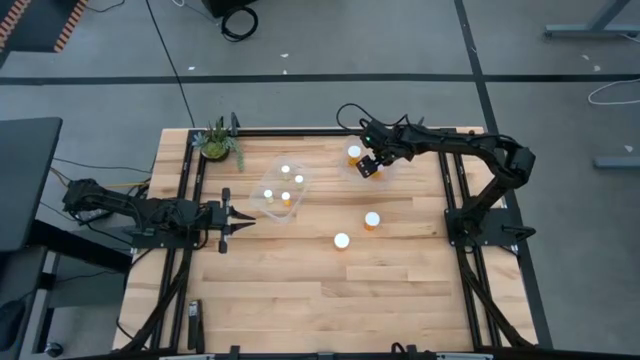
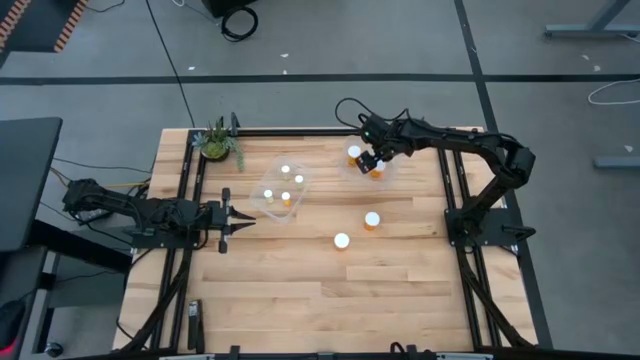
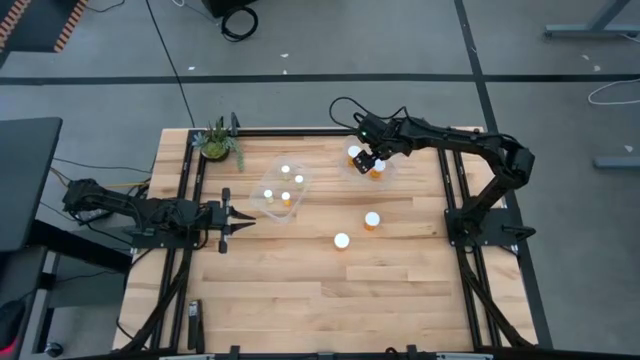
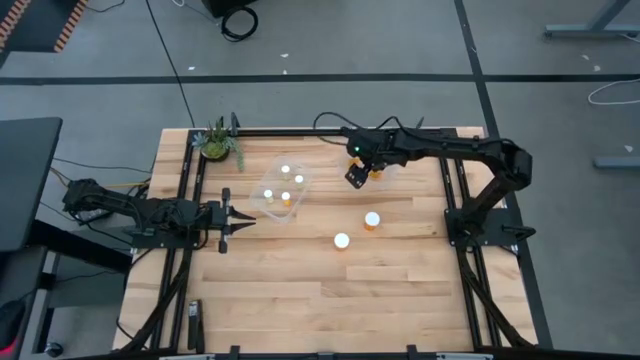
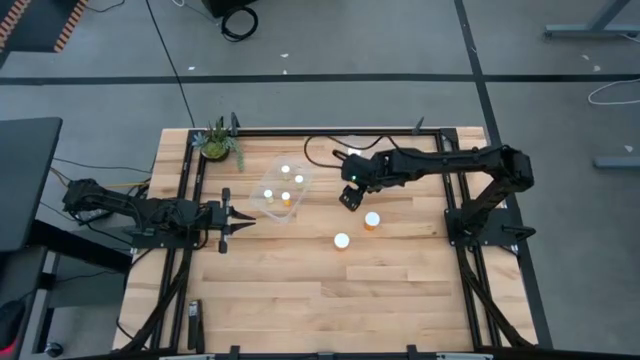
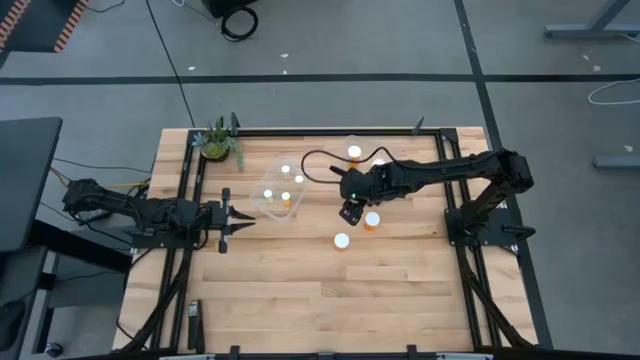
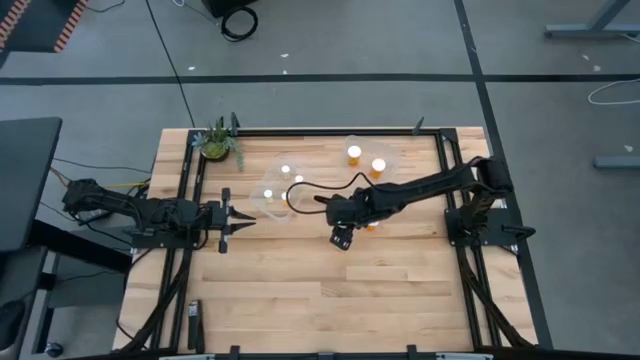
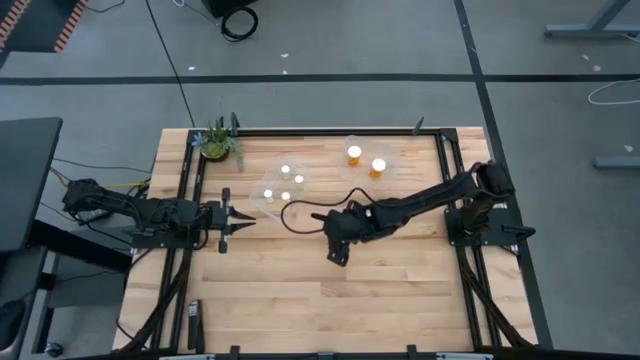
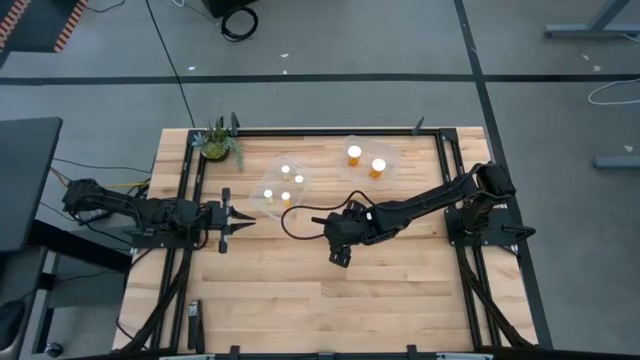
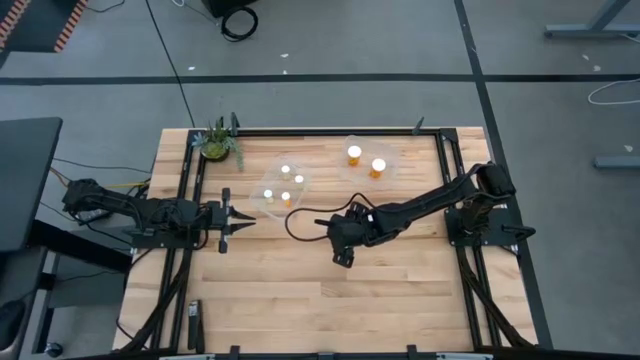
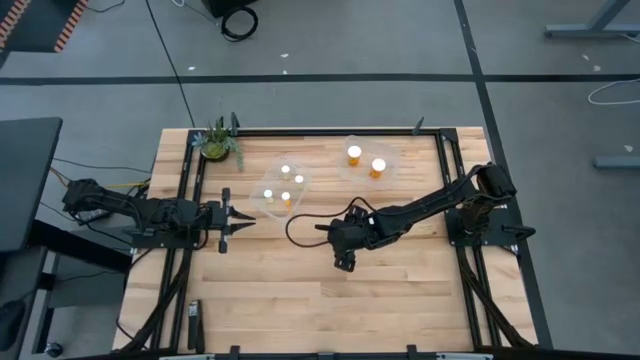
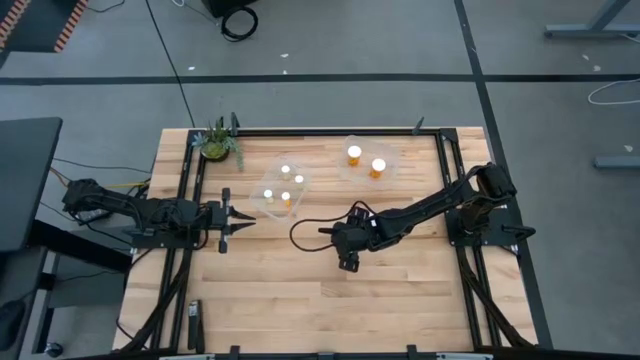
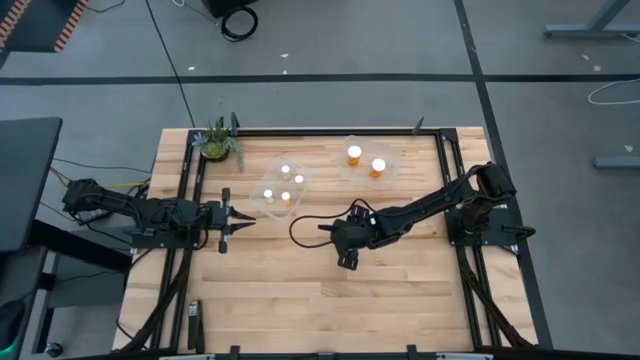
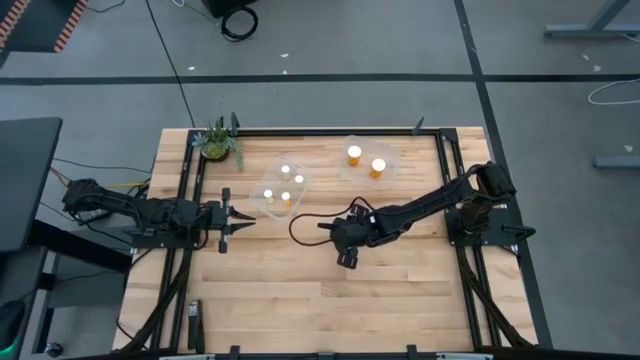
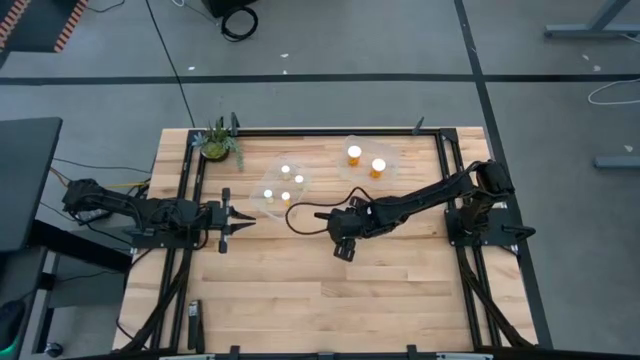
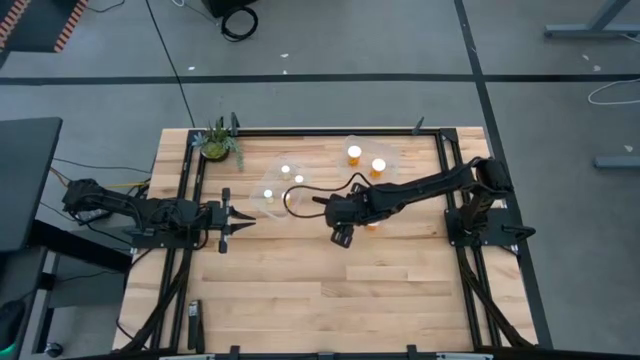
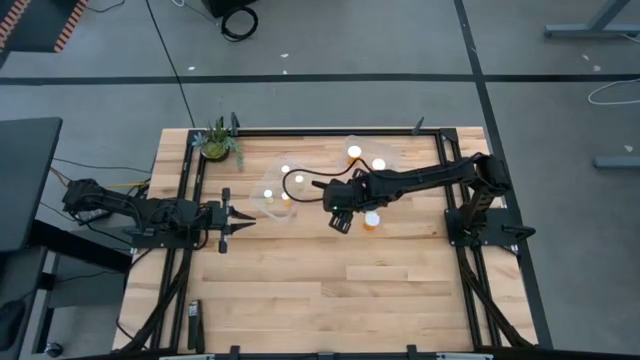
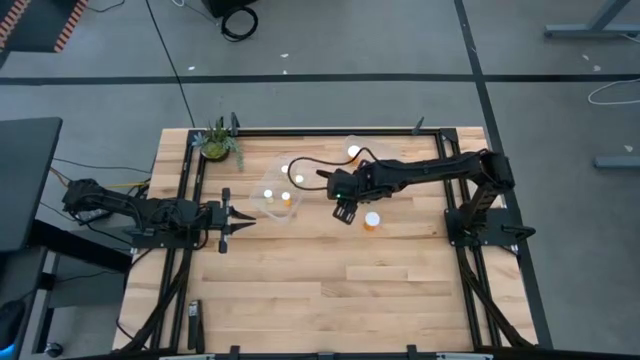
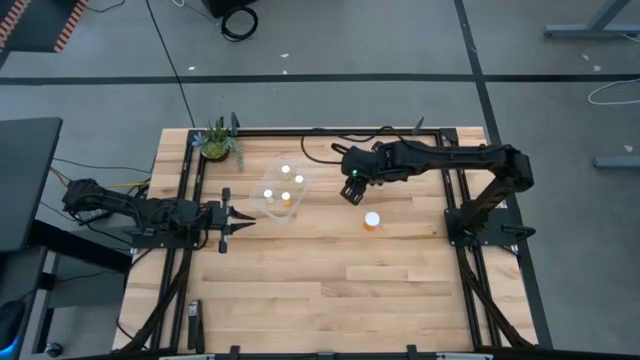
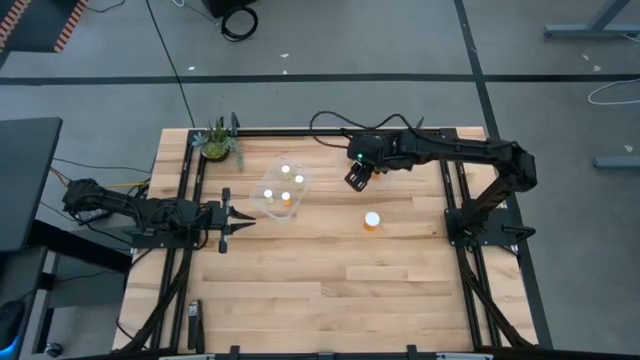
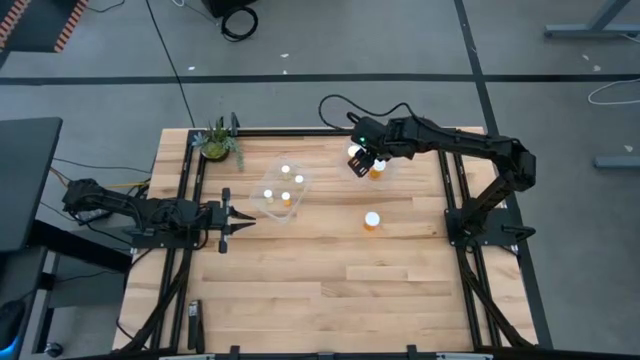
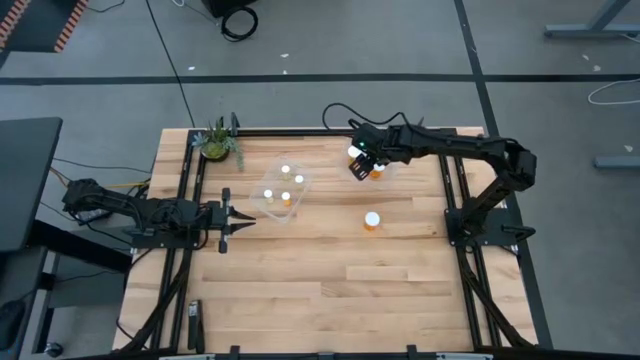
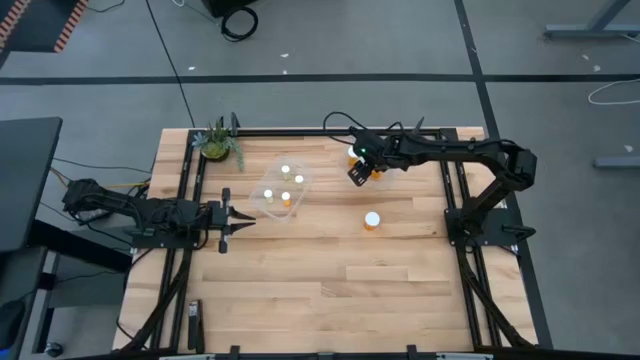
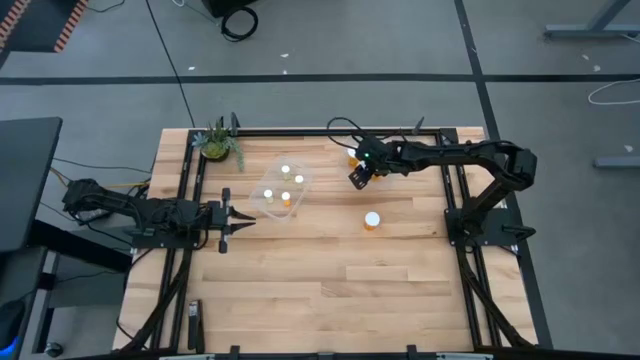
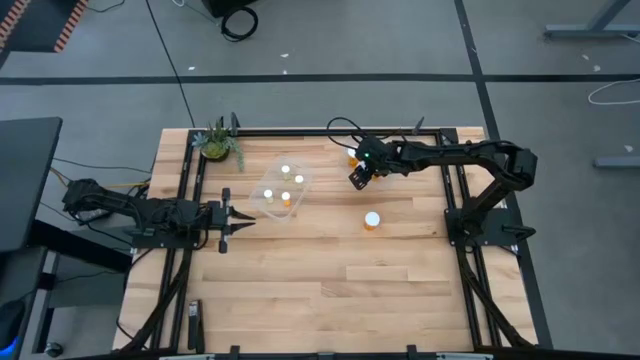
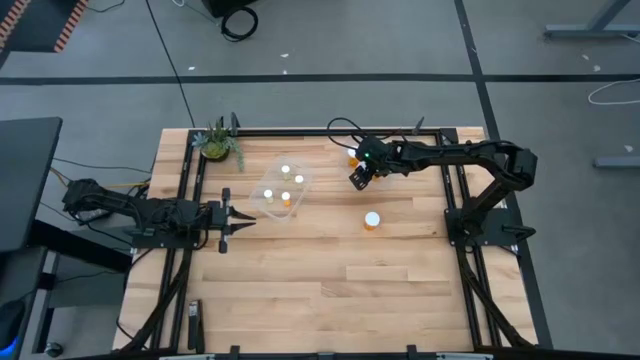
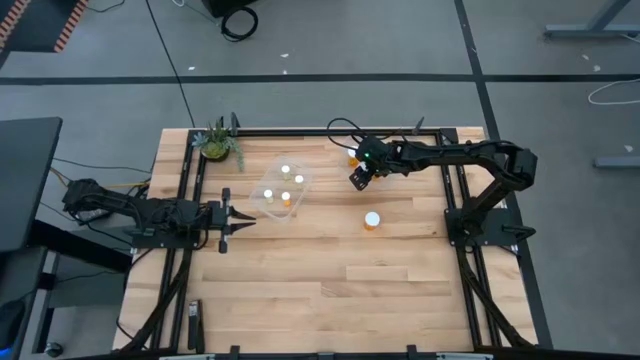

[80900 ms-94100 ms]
Task: Pick and place medicine bottles into bin by pill shape (circle, oval)
Put the large orange pill bottle into the right transparent bin

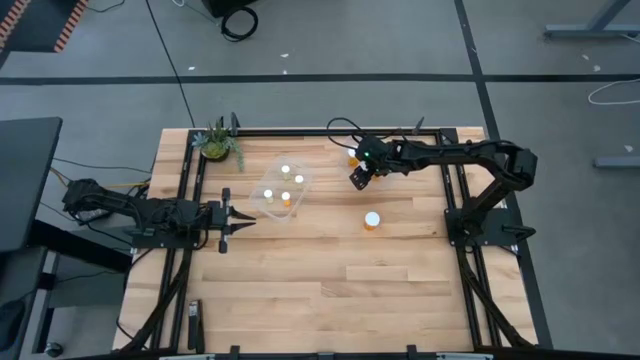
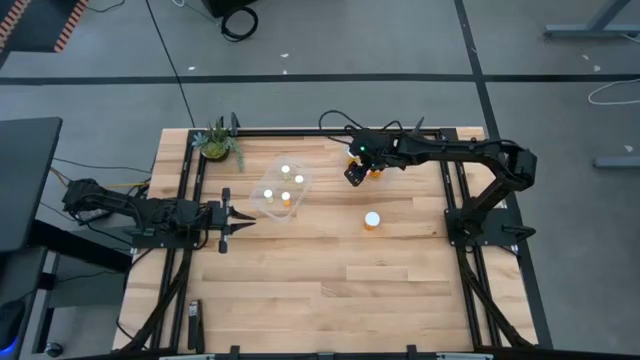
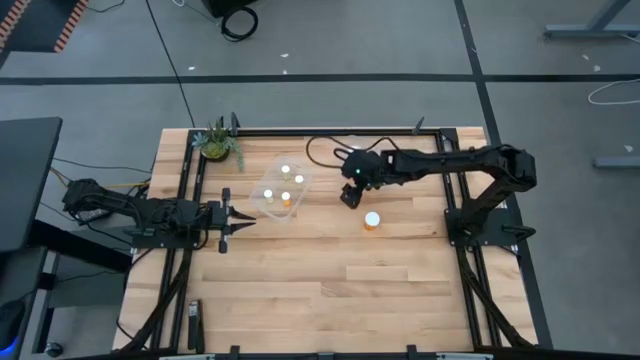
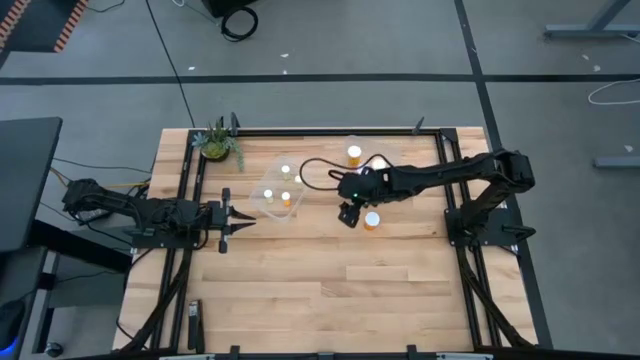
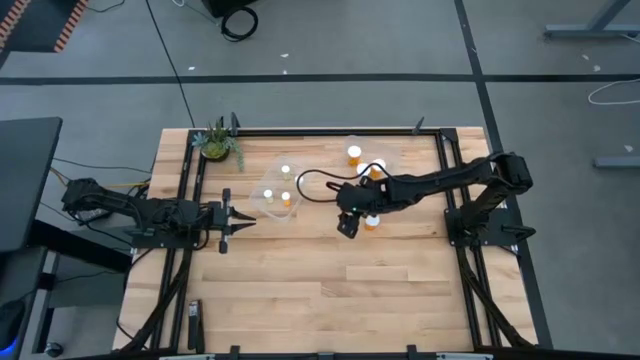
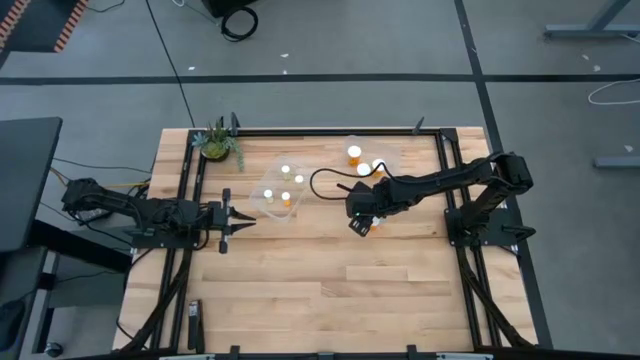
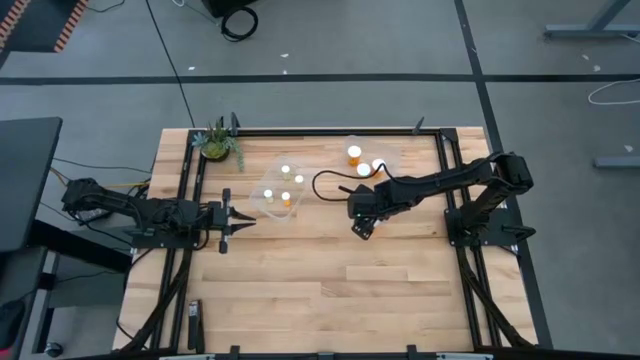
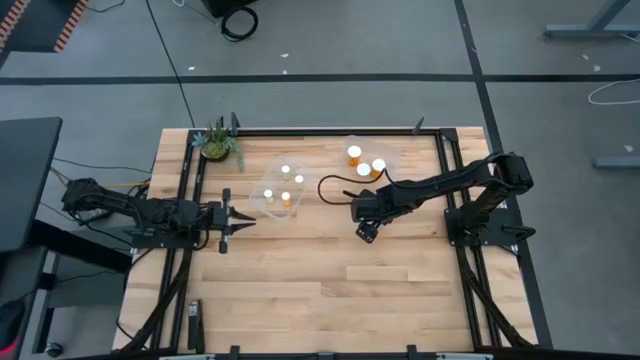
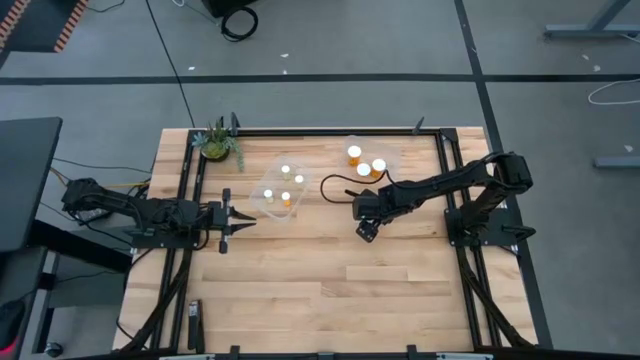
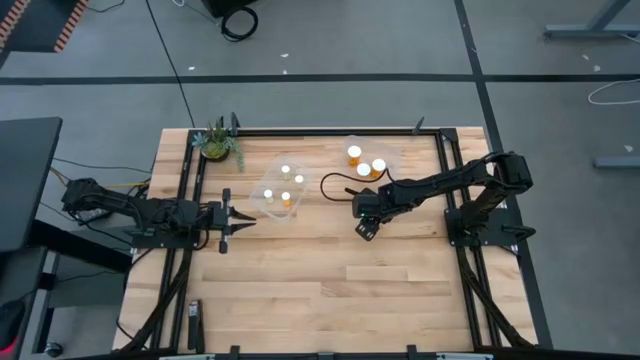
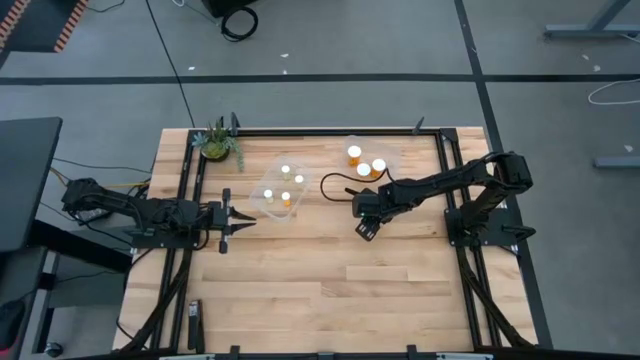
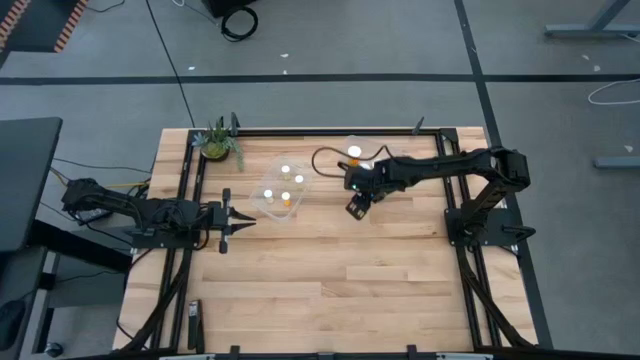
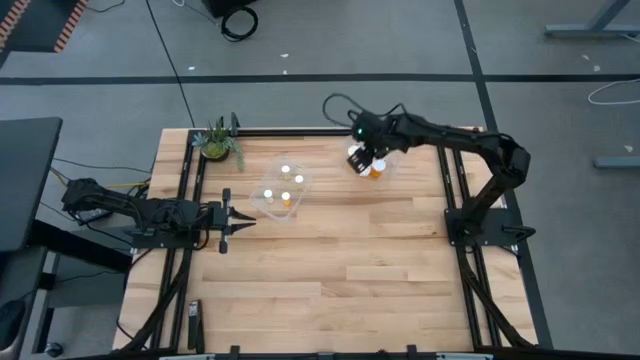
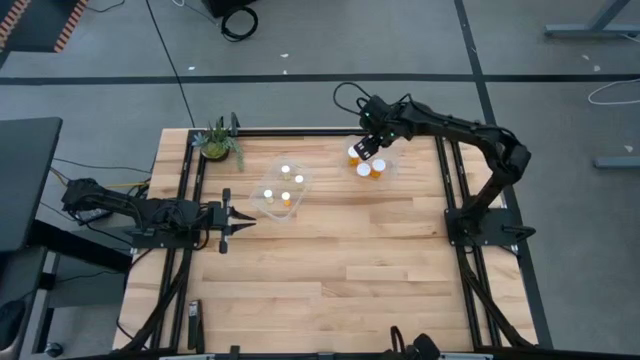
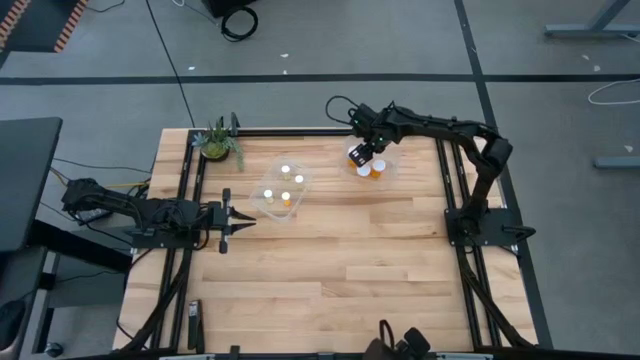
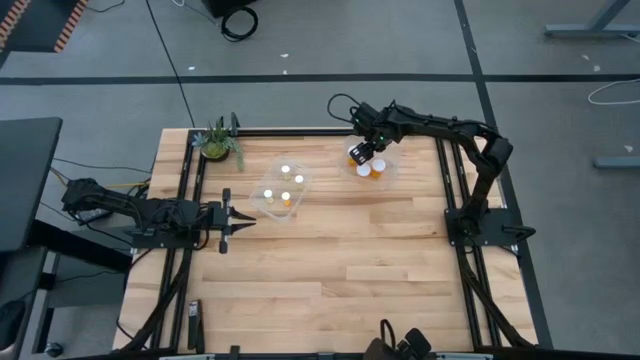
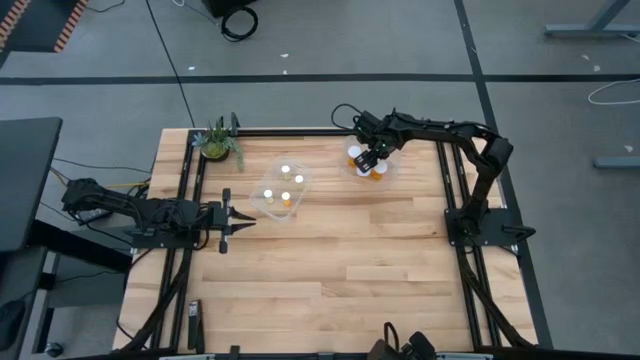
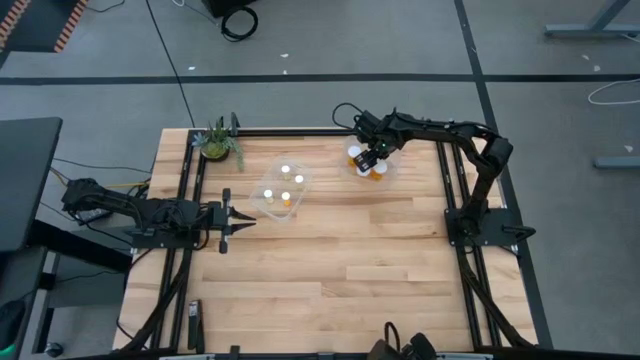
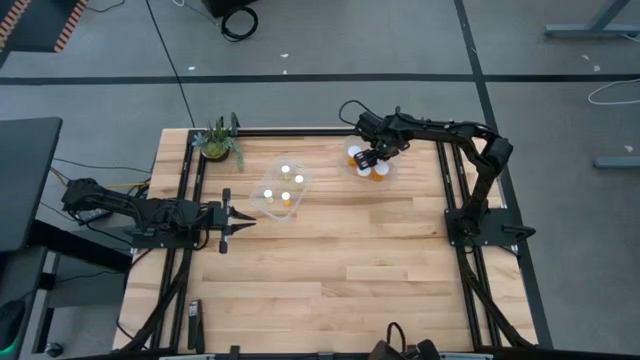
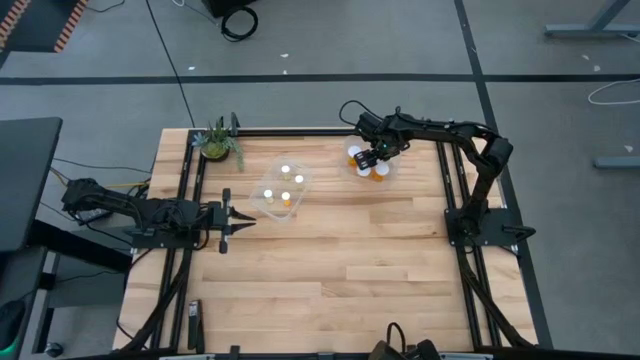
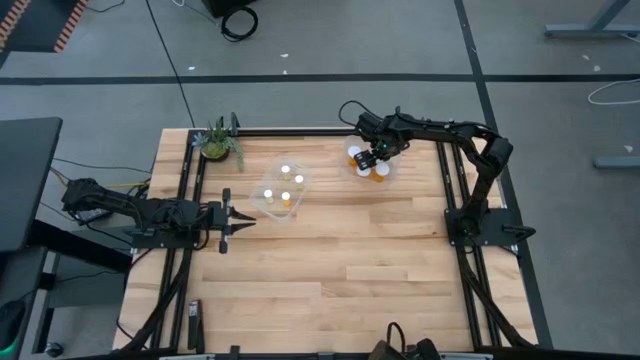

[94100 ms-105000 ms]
Put the large orange pill bottle into the right transparent bin
